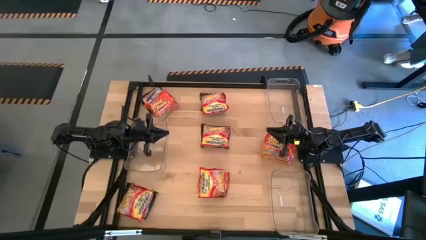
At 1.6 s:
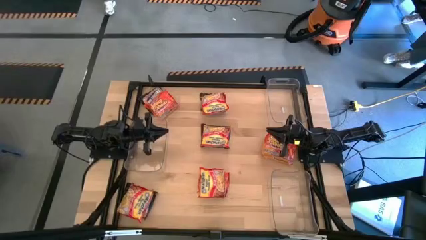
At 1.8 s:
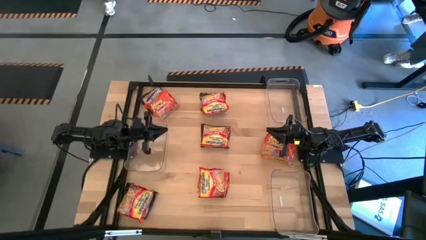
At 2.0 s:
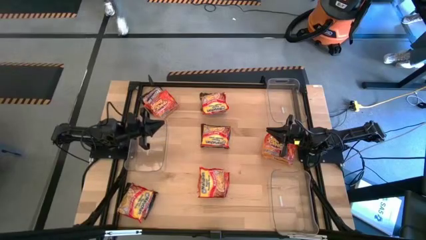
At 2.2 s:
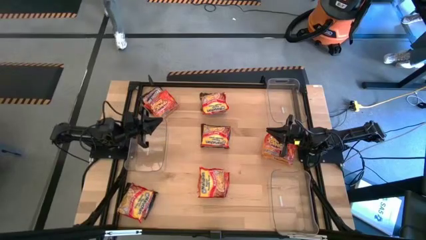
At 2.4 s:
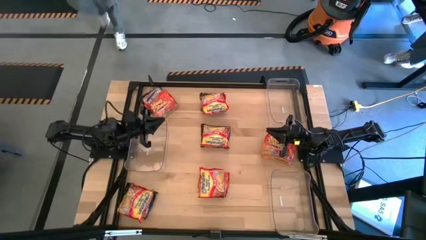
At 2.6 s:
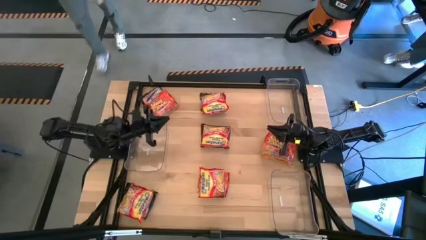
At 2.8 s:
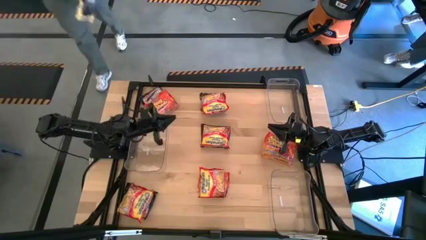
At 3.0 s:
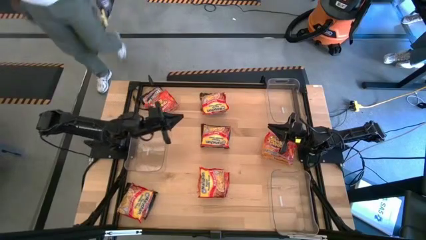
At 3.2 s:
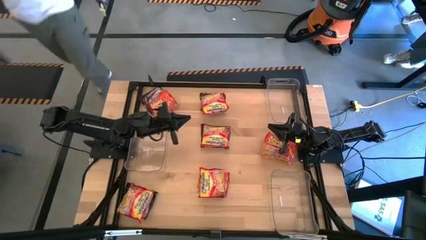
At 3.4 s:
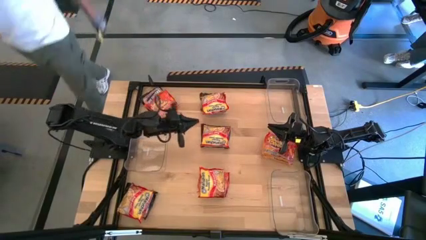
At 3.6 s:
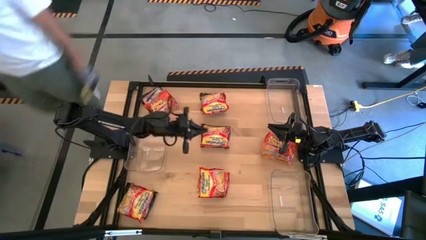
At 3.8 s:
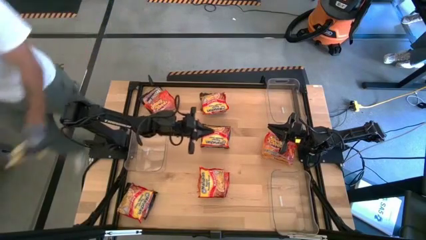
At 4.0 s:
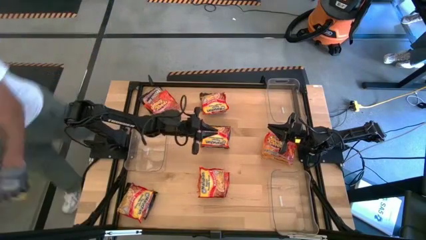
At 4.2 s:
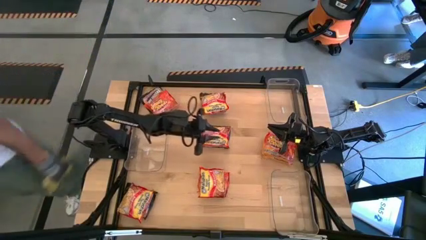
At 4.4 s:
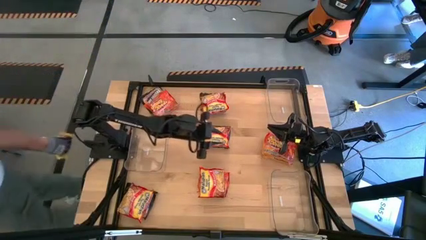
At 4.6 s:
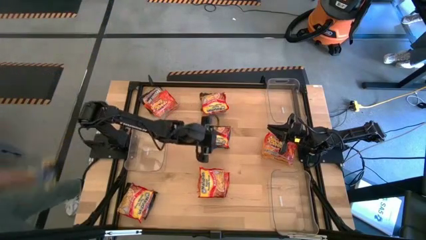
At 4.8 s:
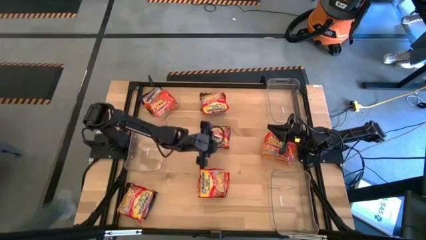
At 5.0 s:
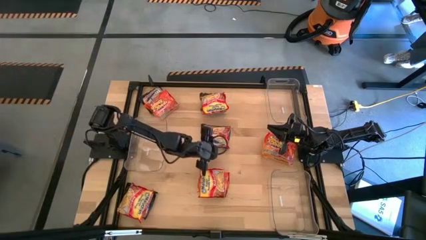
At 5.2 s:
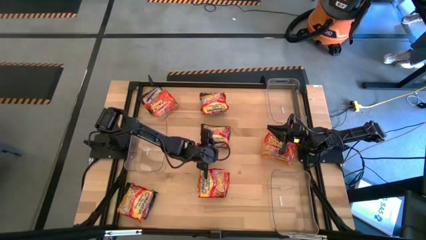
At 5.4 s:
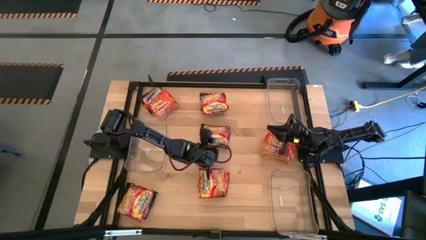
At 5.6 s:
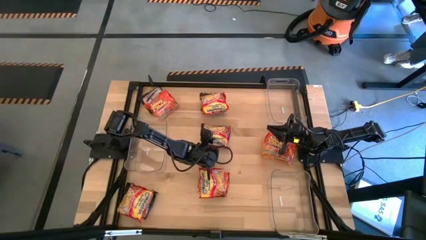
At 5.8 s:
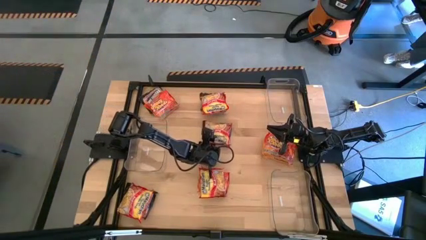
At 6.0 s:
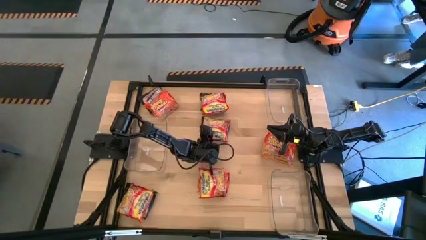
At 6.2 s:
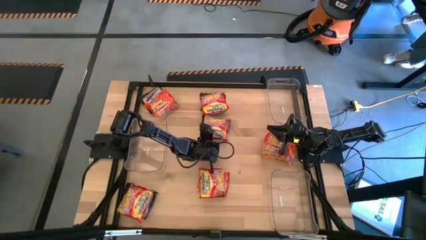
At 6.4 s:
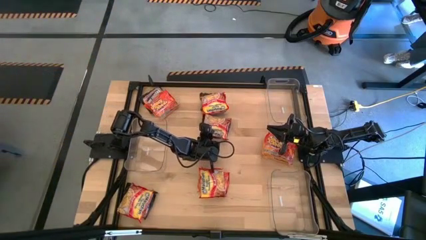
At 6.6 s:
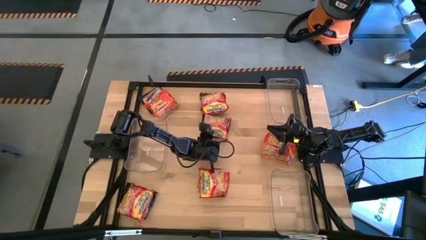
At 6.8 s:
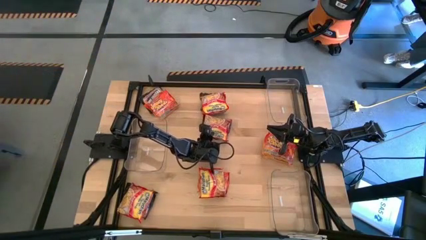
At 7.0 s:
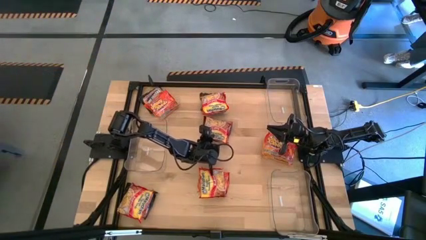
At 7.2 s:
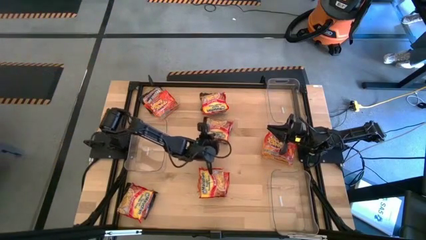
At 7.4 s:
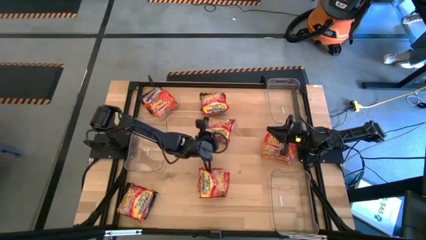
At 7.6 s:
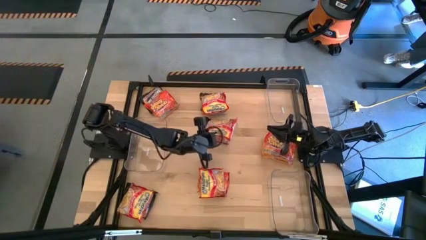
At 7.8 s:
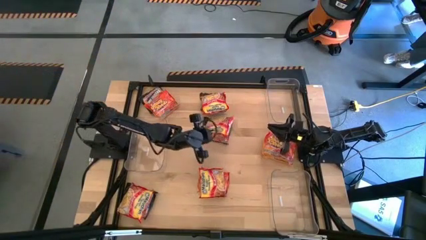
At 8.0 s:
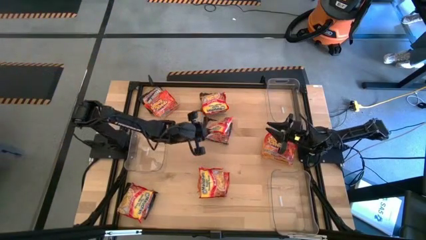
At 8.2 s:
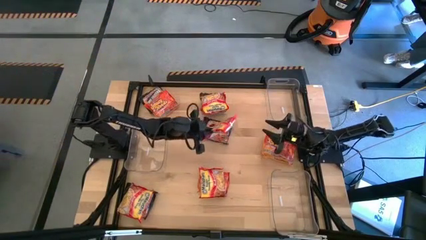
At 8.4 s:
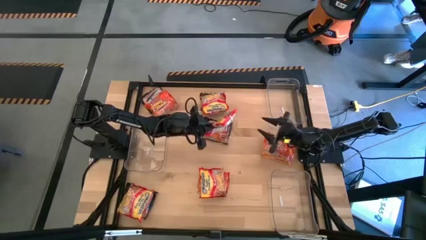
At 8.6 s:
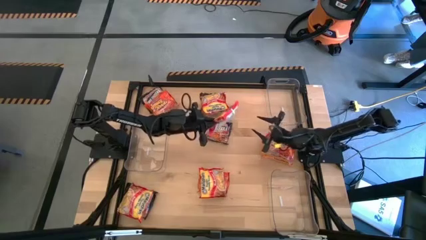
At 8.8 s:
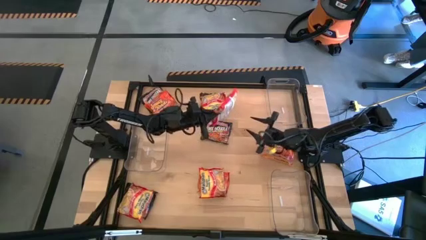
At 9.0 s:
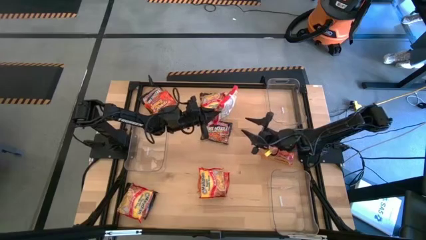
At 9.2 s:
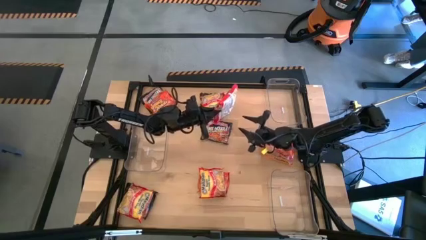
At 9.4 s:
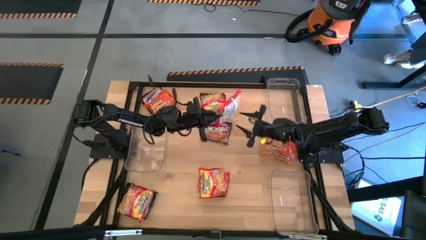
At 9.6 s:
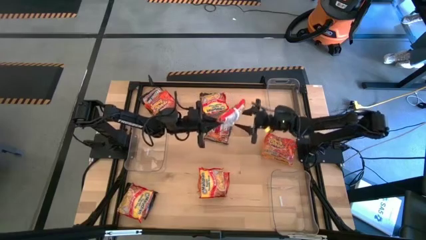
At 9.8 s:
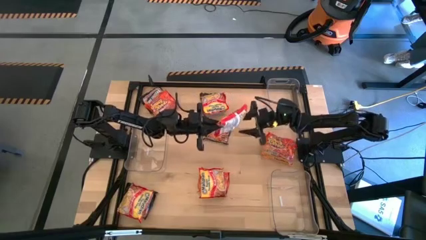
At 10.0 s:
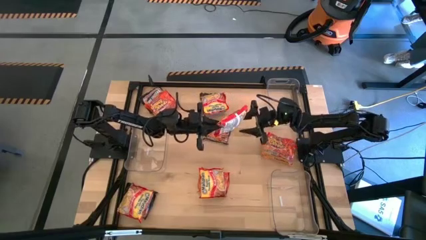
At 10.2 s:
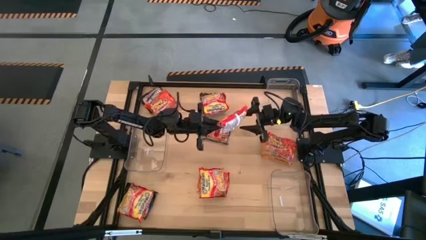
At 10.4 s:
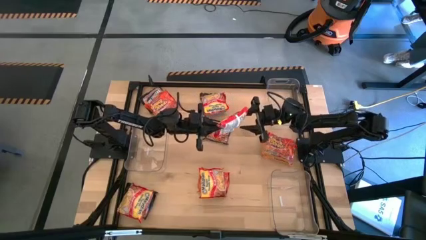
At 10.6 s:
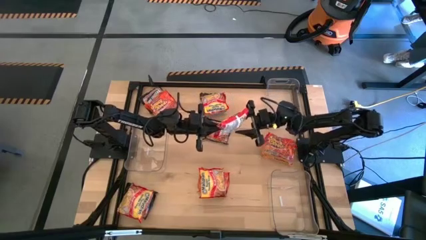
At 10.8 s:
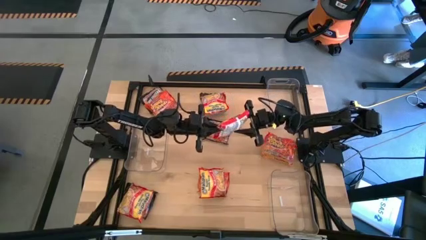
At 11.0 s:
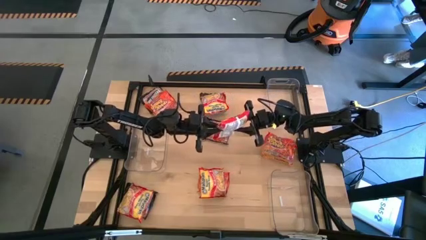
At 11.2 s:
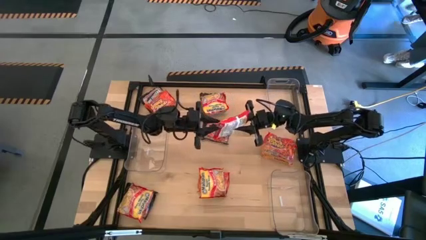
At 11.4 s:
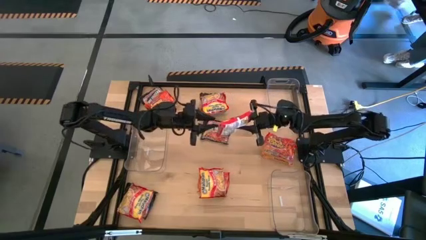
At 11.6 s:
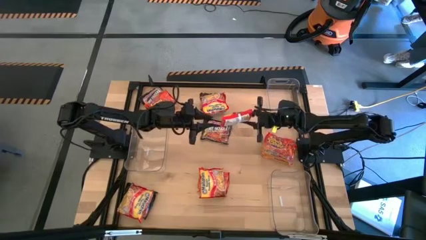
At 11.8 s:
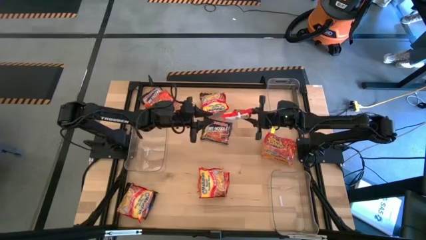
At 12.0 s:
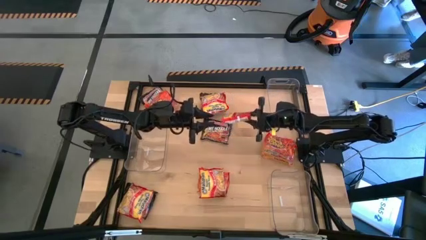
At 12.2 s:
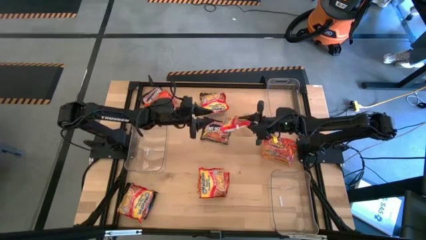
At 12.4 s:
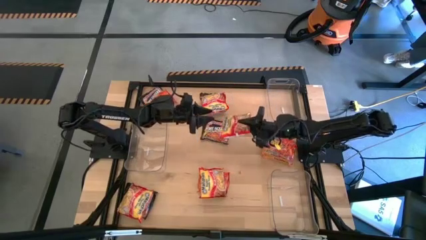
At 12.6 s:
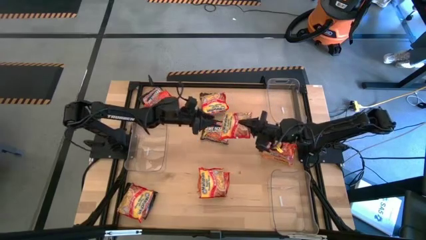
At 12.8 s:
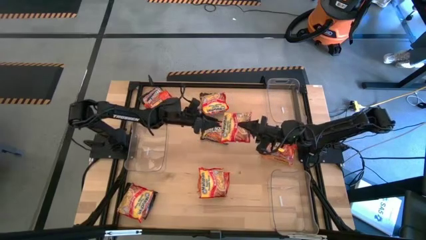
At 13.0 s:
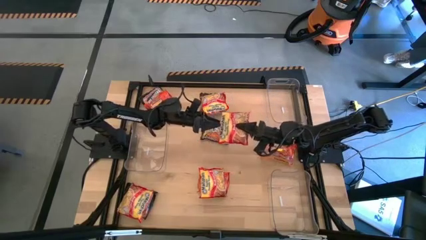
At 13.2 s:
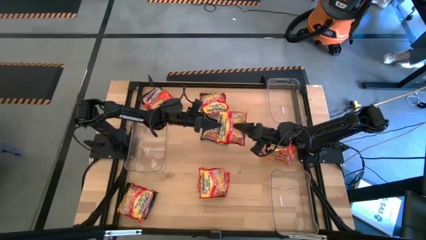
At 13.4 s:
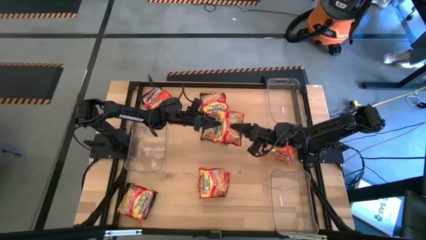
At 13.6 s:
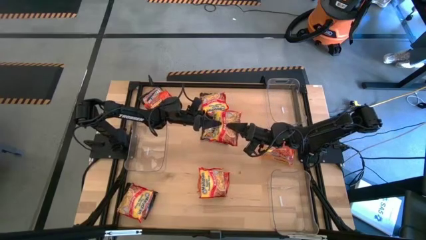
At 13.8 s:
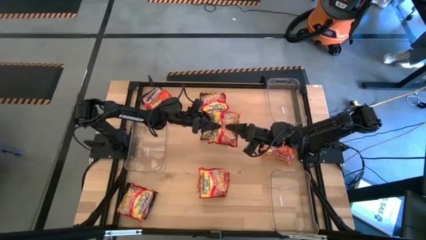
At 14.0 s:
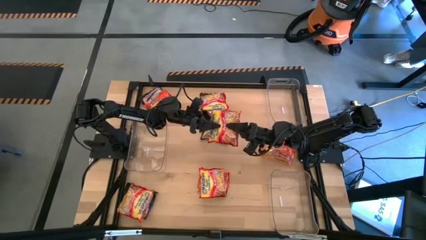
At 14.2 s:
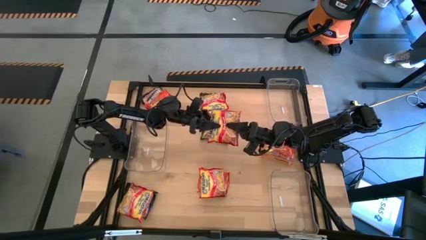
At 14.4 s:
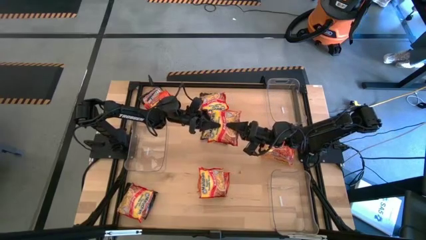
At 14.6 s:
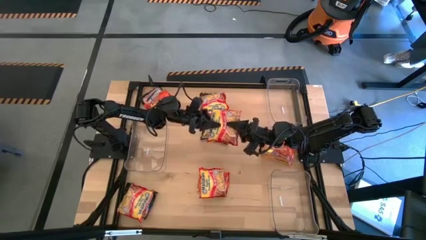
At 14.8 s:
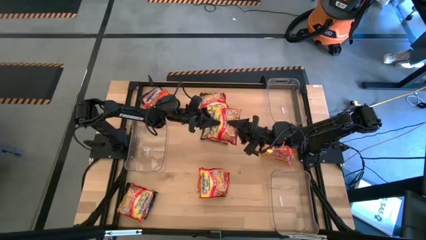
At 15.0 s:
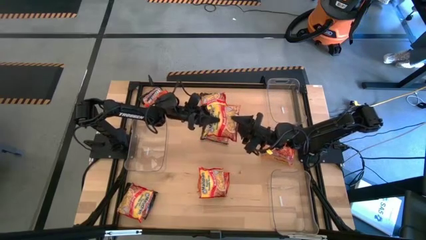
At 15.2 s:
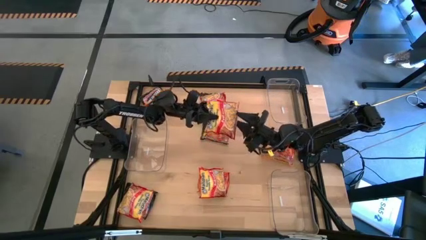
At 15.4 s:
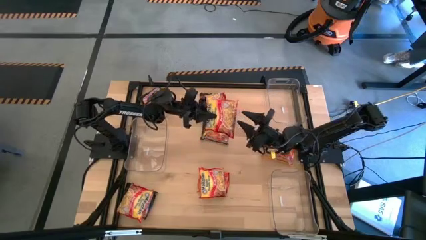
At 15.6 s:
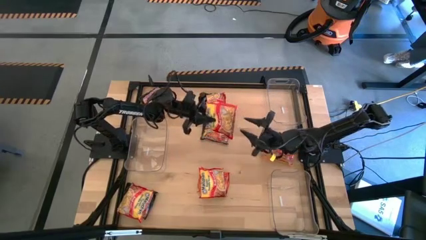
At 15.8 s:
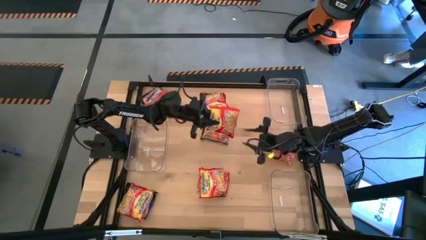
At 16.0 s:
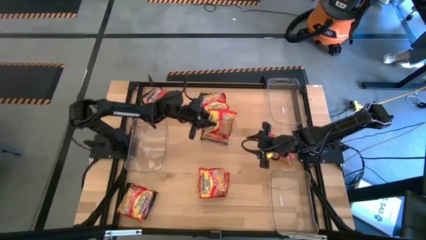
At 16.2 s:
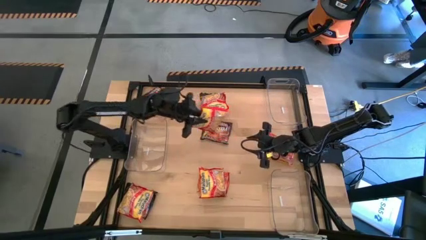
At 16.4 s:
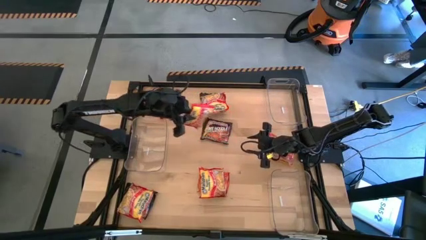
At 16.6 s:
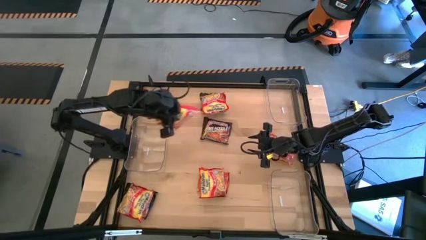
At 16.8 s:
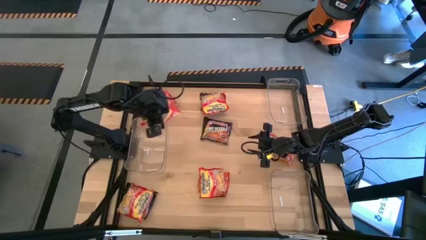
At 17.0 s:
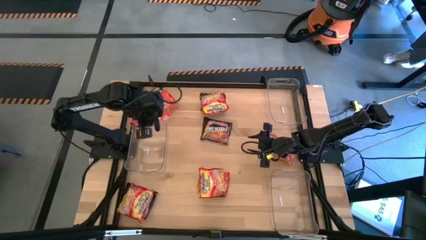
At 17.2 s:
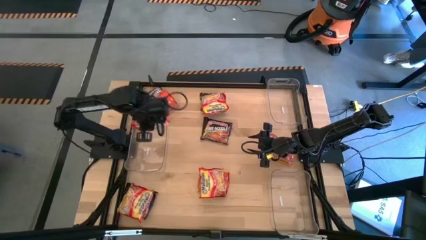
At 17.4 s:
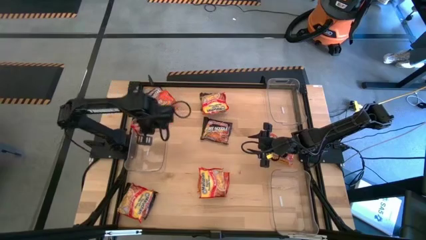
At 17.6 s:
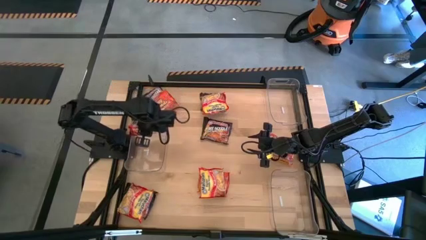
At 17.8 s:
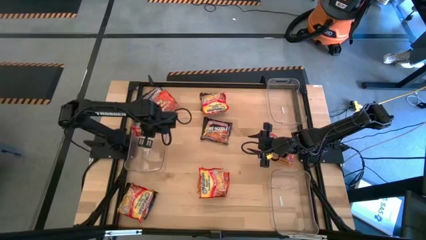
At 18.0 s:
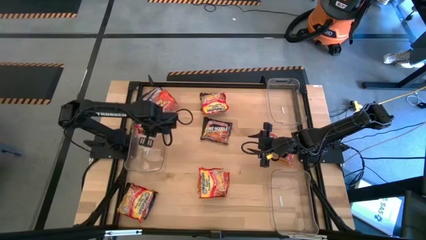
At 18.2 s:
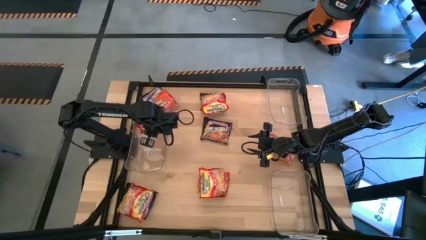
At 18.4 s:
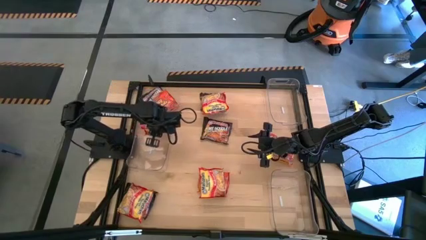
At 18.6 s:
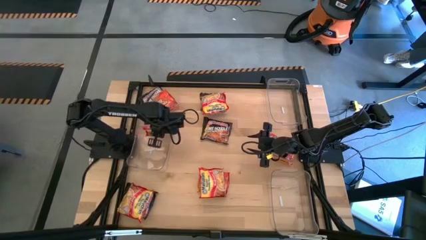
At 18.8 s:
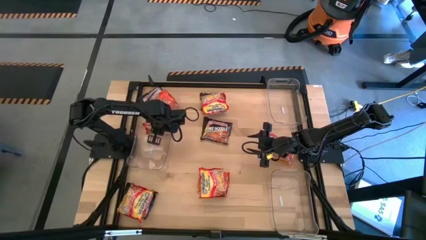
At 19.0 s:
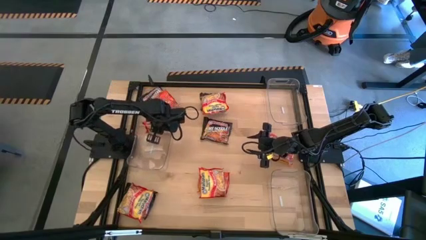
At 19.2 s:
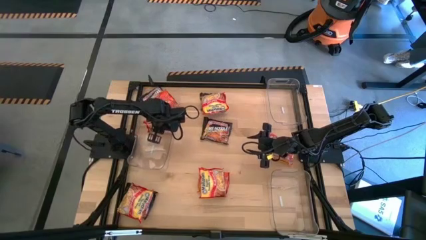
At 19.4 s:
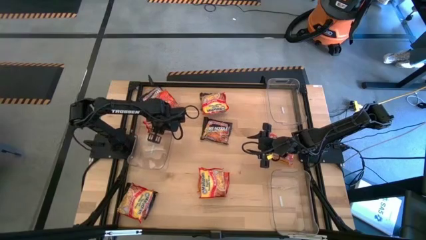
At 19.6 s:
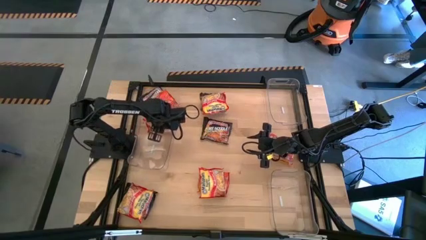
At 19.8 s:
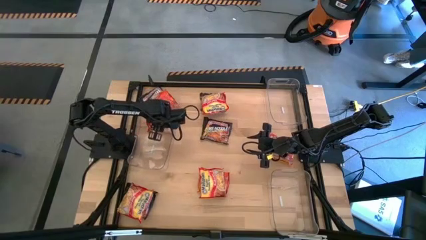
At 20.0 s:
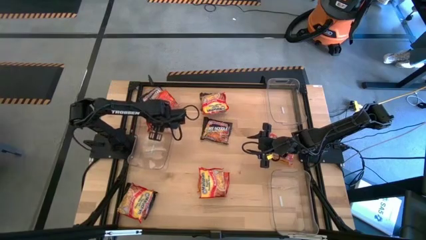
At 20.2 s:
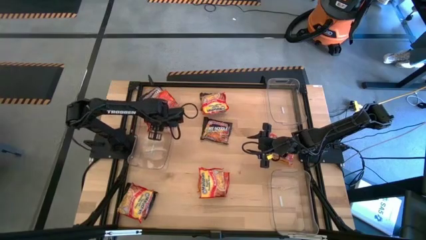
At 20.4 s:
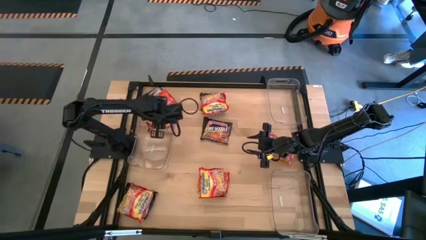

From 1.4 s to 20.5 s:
Task: Sort Maruchan noodles
Put the red noodle pack into the middle transparent bin
